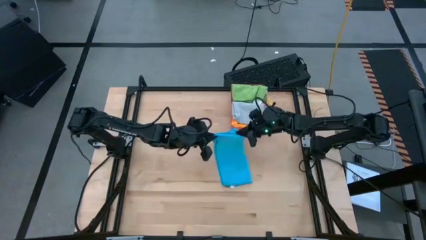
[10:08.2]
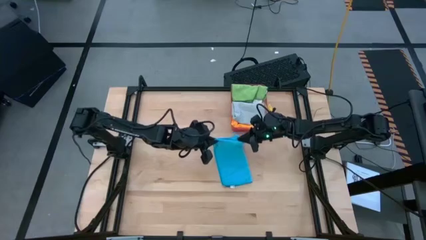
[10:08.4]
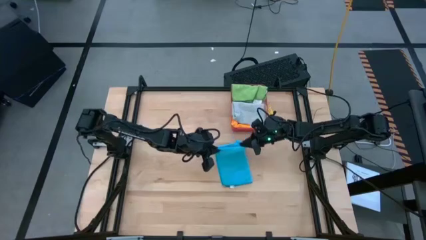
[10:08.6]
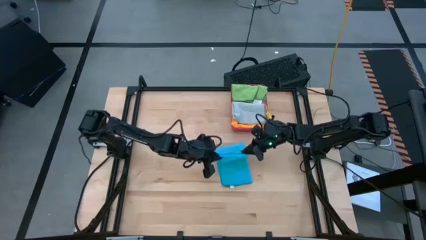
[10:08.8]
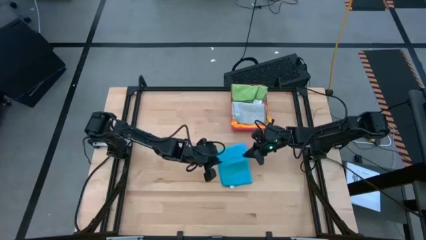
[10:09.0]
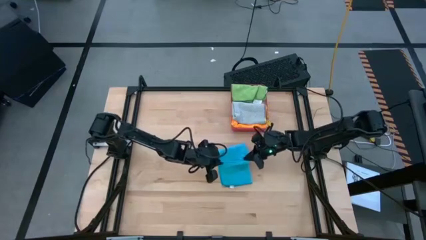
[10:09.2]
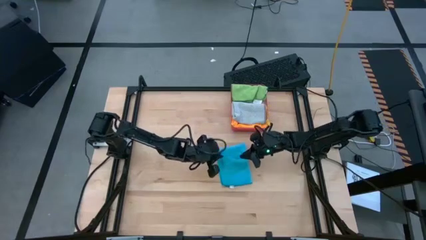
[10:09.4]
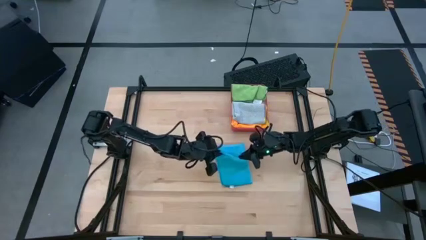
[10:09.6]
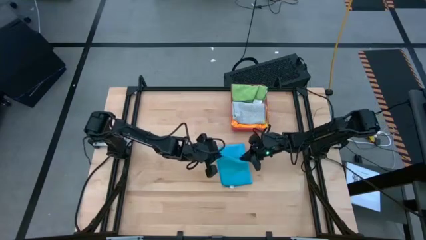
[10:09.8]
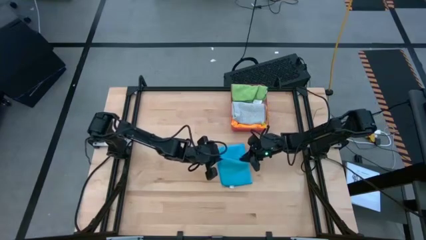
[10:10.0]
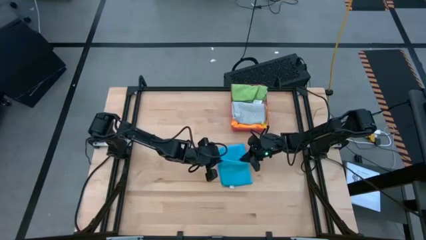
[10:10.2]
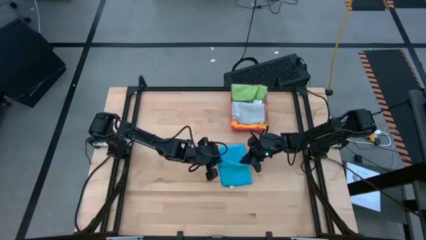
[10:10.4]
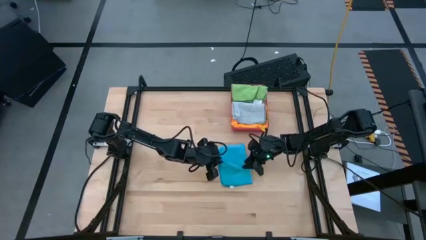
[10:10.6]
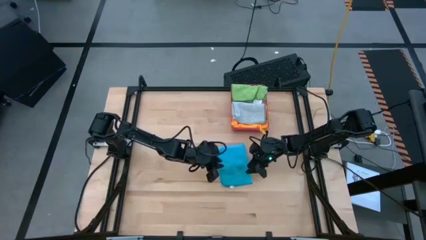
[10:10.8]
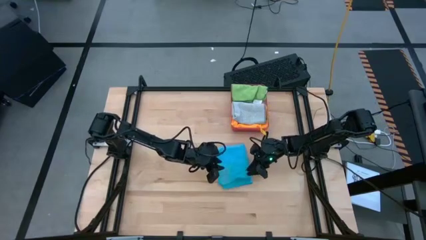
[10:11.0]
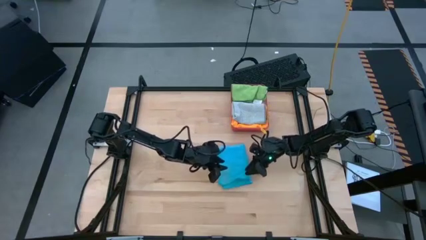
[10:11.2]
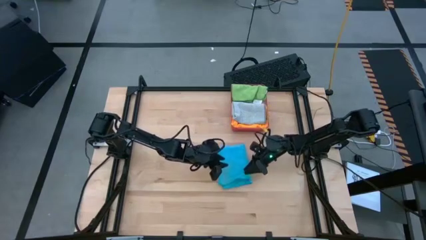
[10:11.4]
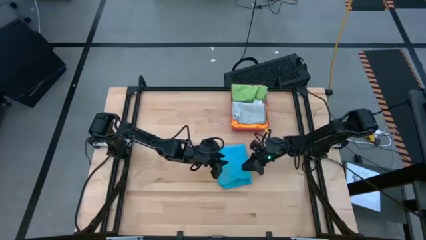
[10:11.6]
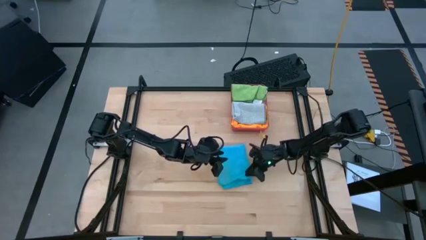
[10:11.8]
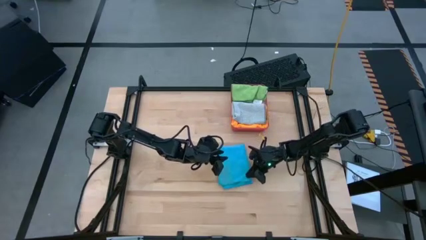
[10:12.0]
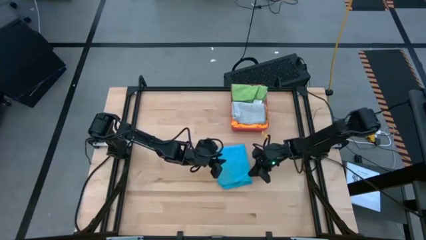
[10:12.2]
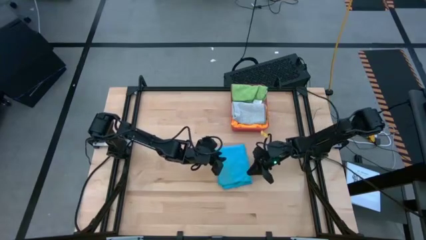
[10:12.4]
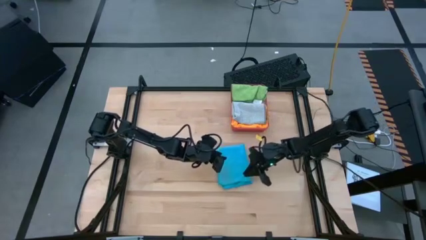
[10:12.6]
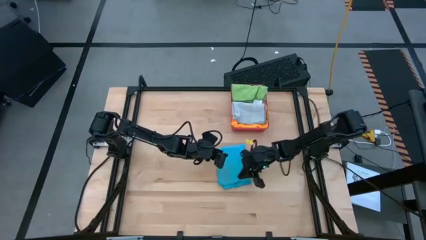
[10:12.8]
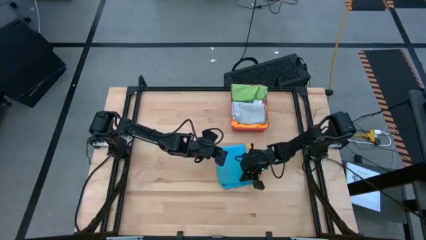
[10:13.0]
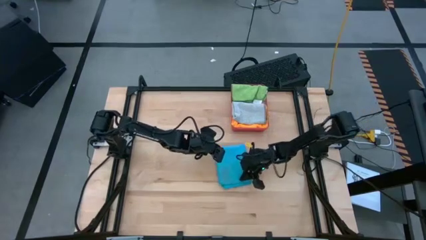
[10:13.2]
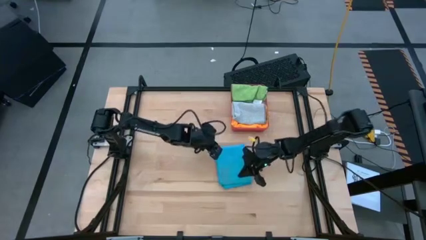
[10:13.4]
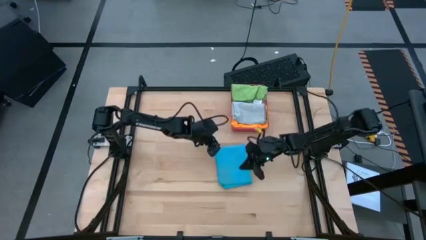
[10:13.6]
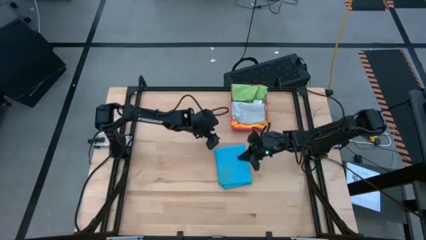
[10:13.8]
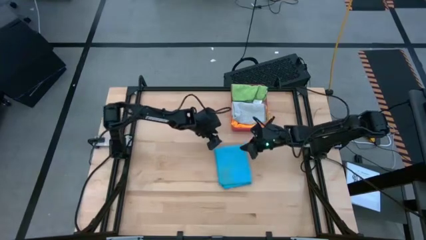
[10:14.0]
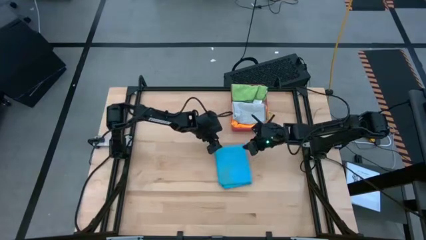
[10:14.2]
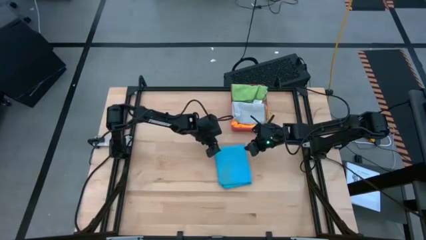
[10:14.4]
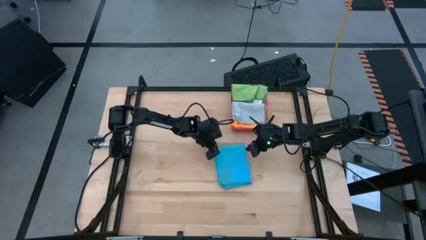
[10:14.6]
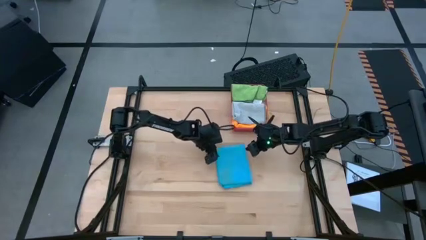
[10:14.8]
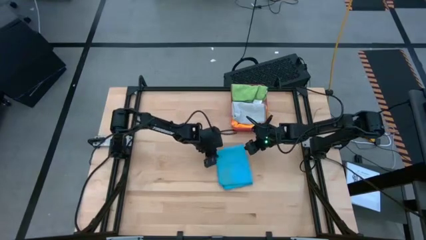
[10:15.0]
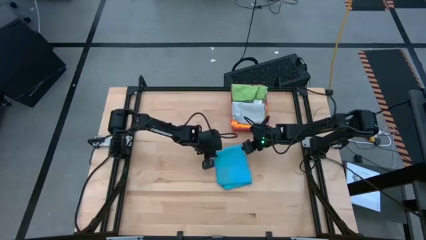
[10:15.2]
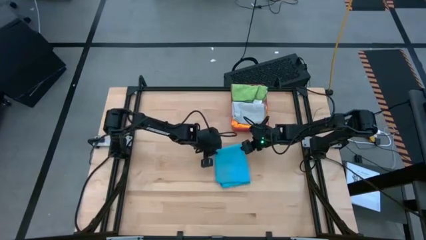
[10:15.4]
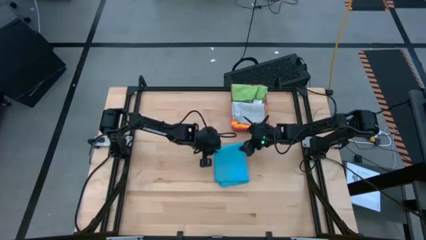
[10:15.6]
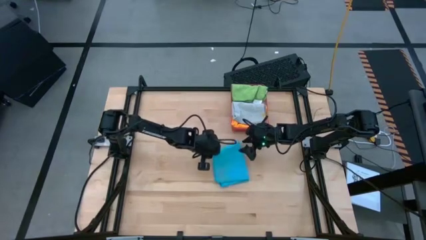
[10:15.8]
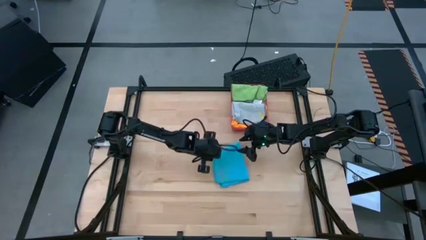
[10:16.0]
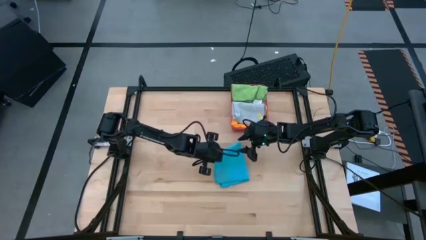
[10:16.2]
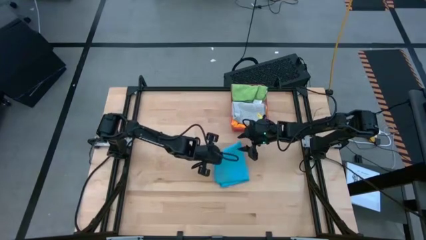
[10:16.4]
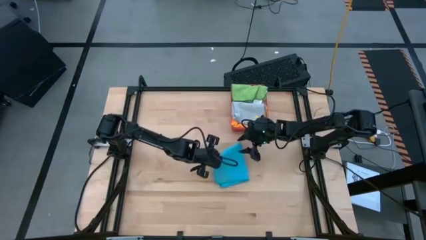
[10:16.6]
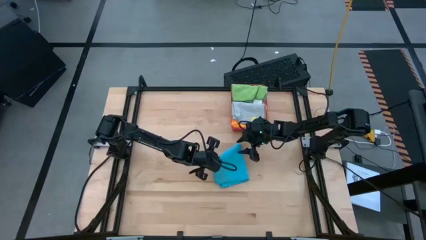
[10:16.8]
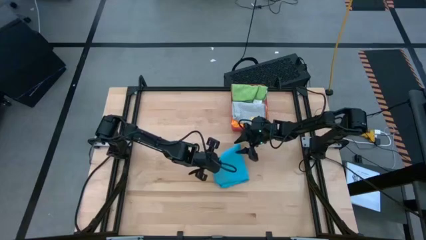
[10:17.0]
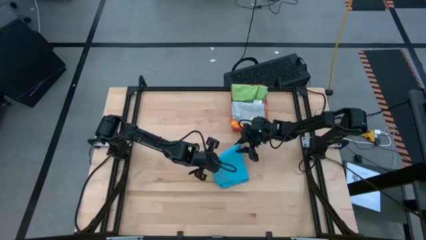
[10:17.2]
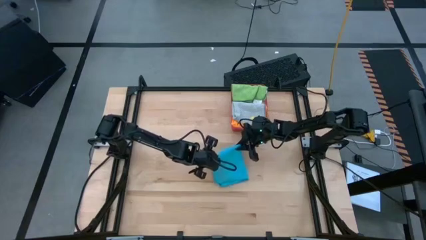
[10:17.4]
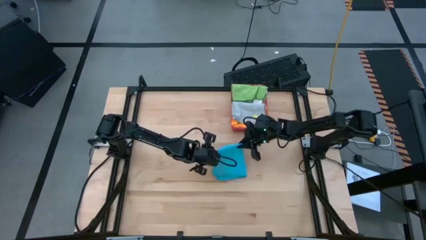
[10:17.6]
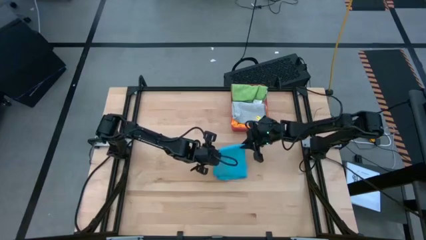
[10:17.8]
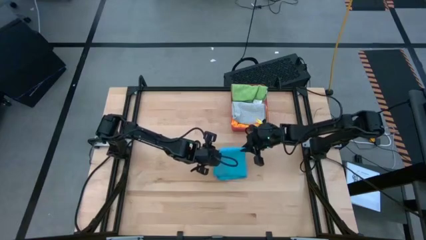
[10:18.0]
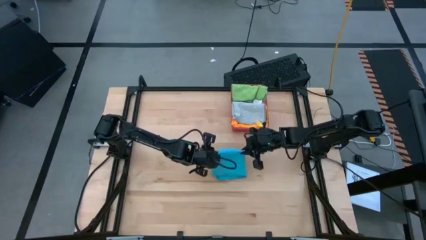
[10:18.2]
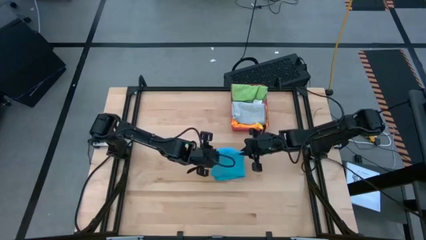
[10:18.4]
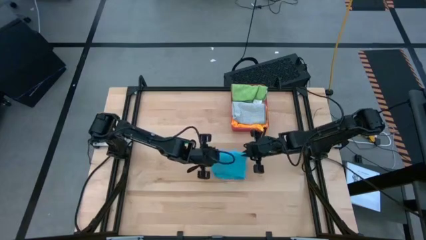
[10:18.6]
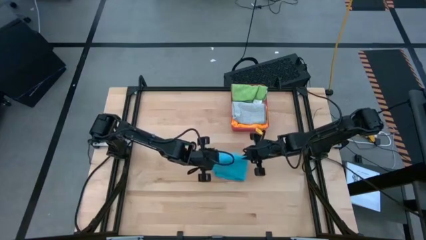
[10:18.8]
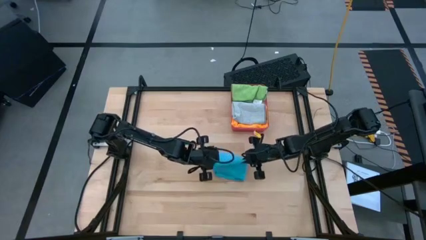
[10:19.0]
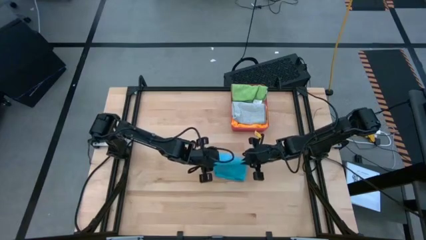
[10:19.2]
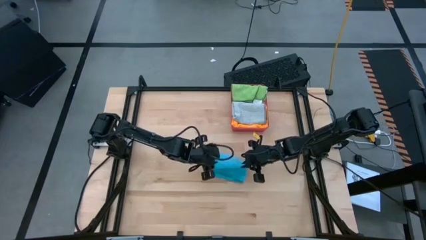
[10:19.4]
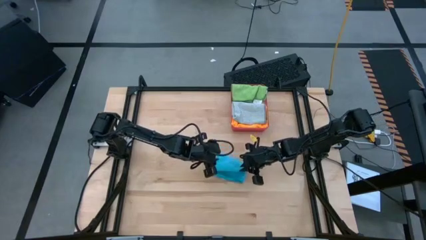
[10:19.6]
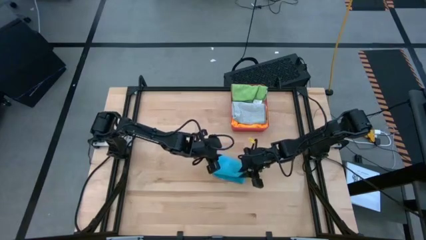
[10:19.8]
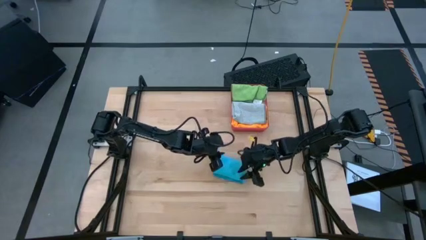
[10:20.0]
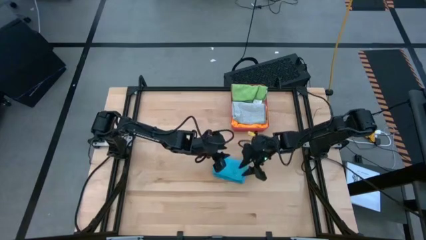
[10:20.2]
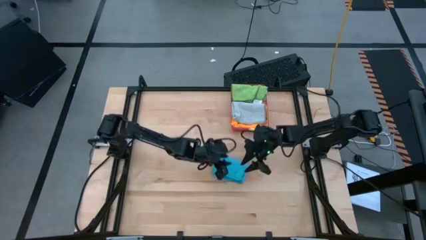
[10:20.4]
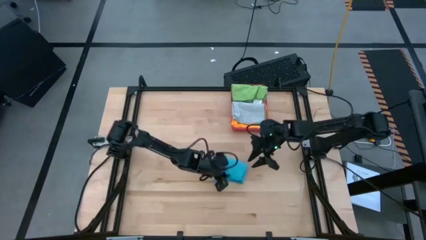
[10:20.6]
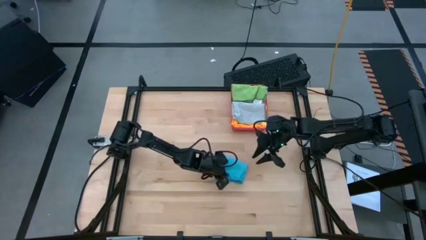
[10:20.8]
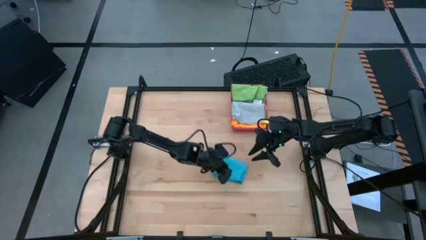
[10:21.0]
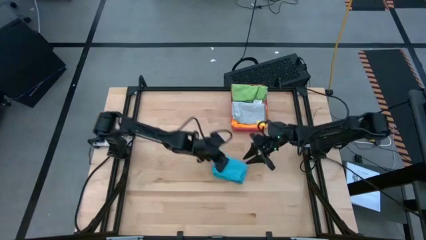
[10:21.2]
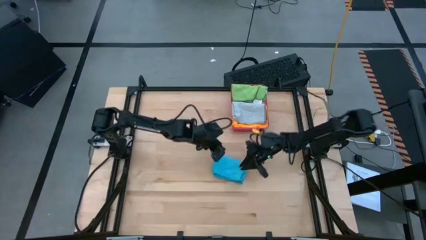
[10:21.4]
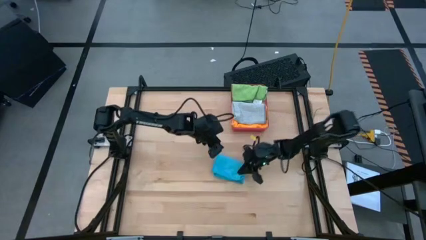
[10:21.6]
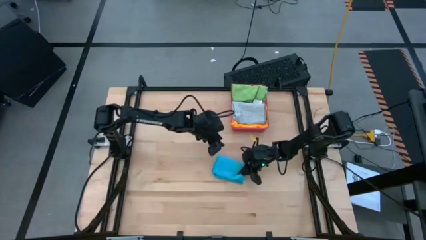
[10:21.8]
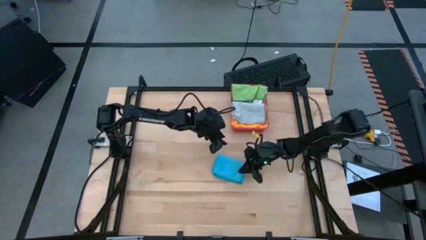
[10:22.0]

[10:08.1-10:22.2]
Task: Fold microfiber towels
Fold the blue microfiber cloth

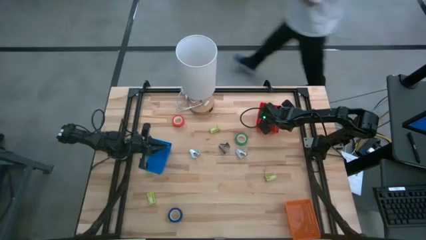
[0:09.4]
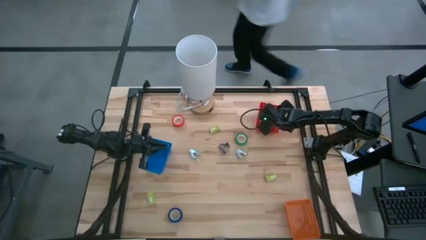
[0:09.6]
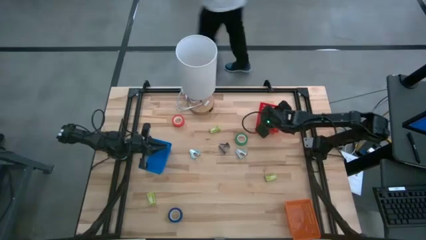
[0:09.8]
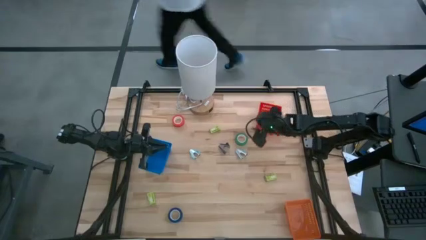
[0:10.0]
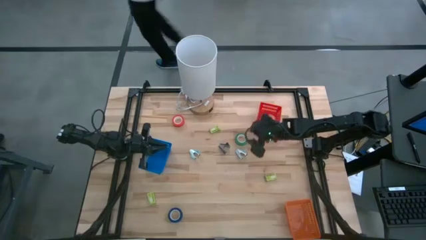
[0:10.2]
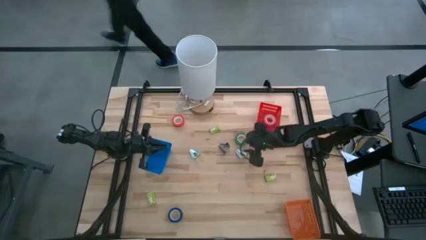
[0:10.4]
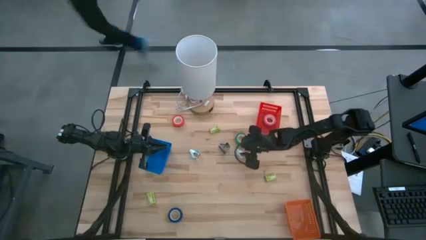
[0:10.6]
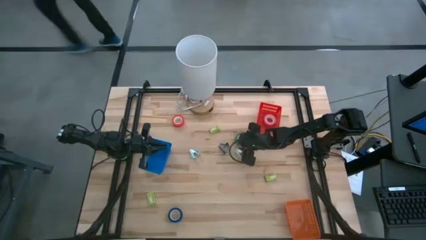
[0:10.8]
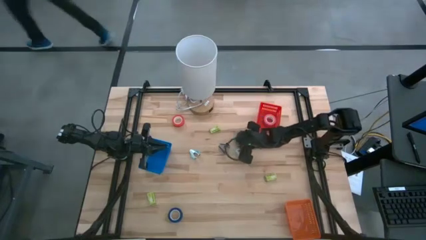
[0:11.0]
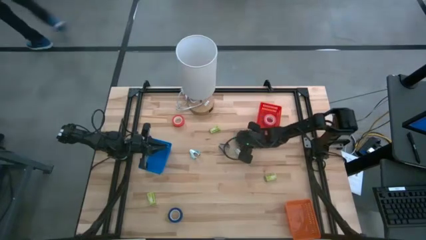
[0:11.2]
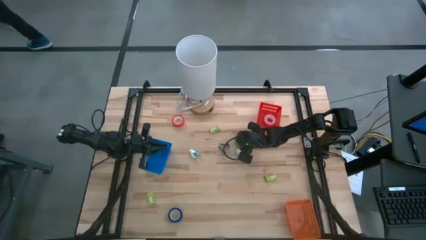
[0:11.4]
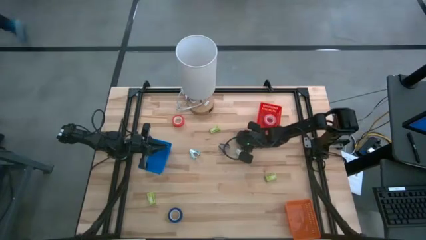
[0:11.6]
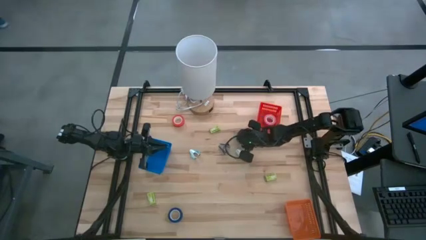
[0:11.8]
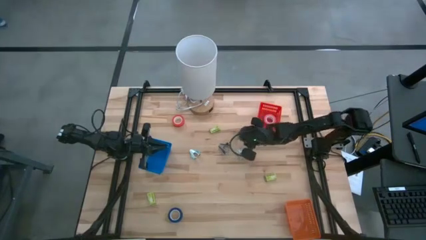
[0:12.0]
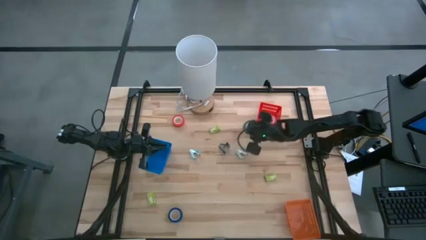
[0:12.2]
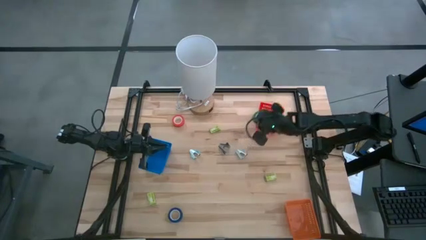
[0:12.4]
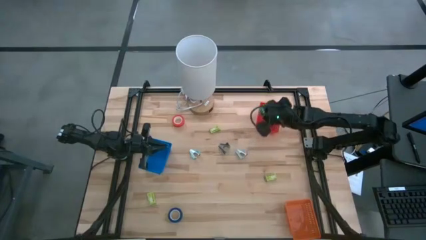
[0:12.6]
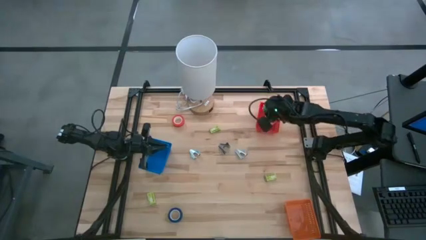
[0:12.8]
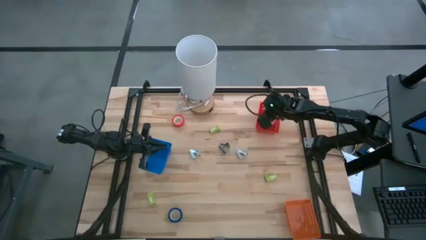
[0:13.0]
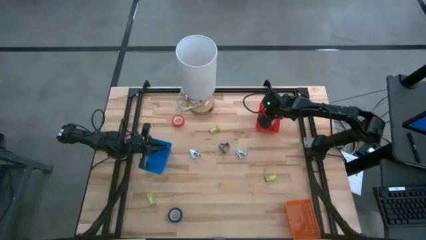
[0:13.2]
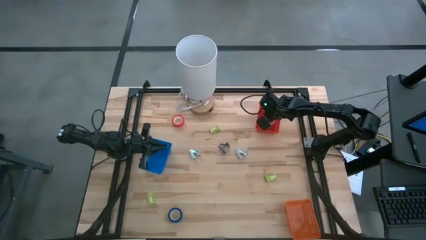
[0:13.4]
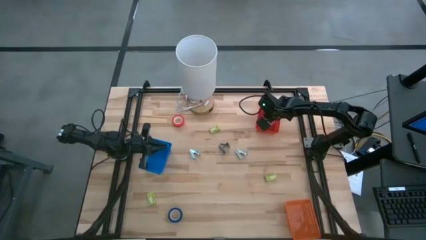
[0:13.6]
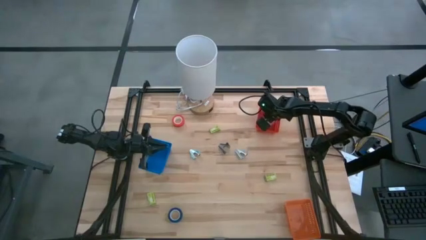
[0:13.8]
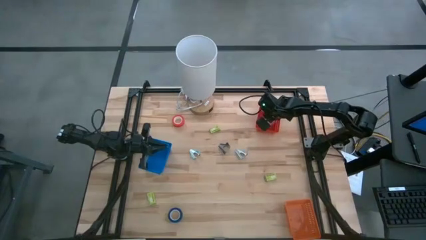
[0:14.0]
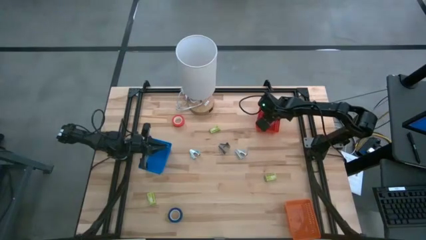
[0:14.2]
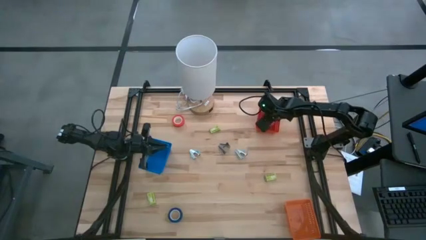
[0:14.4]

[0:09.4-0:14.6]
Task: Pick and place Stapler, Stapler remover, tape
Put the green tape into the red bin
